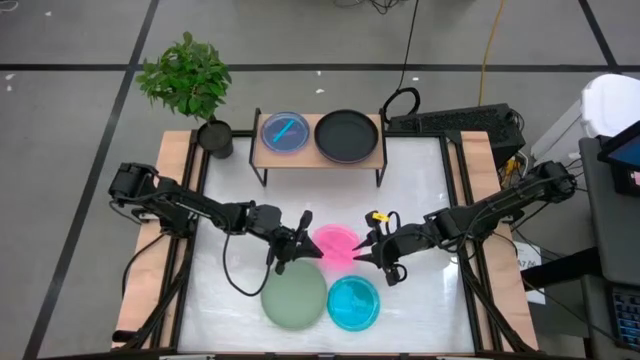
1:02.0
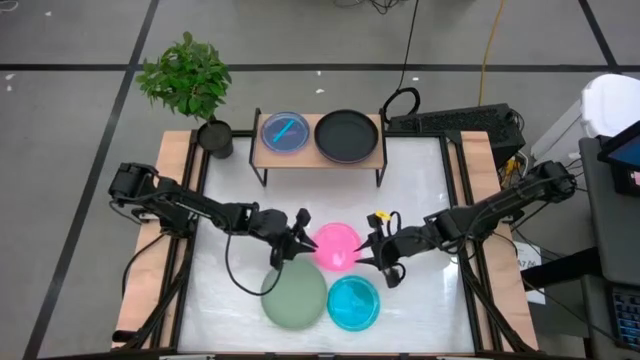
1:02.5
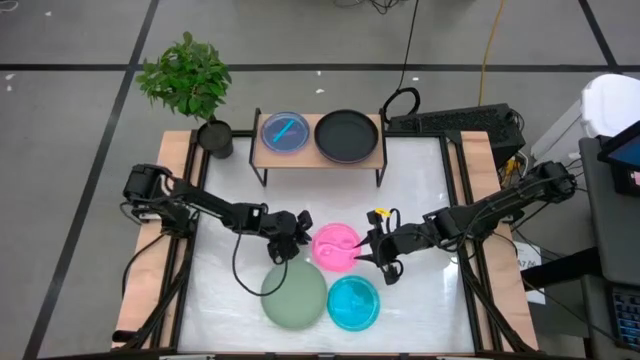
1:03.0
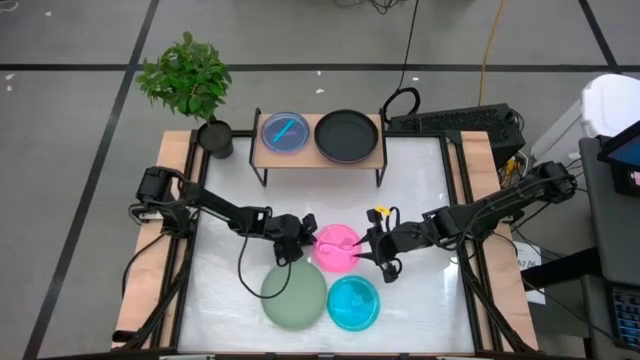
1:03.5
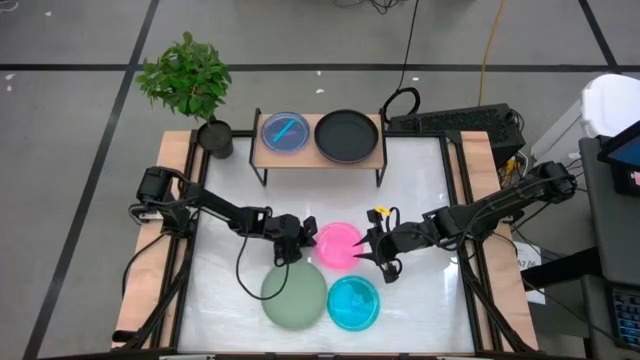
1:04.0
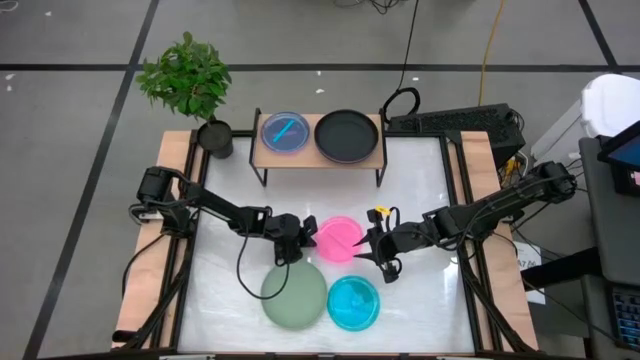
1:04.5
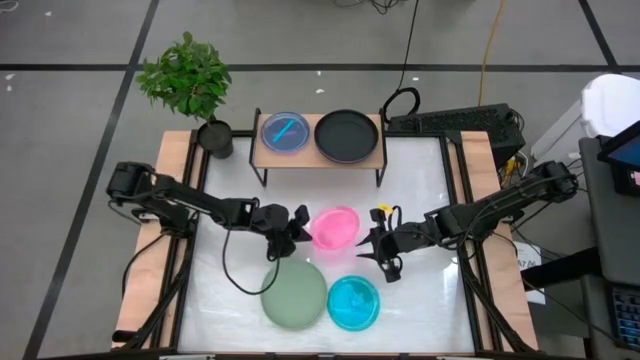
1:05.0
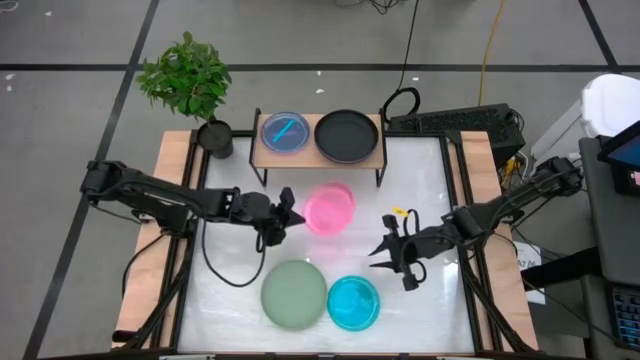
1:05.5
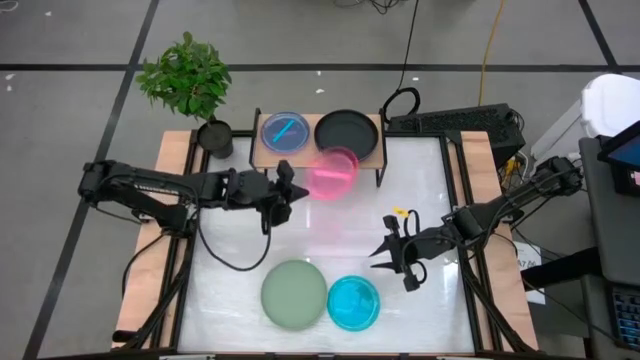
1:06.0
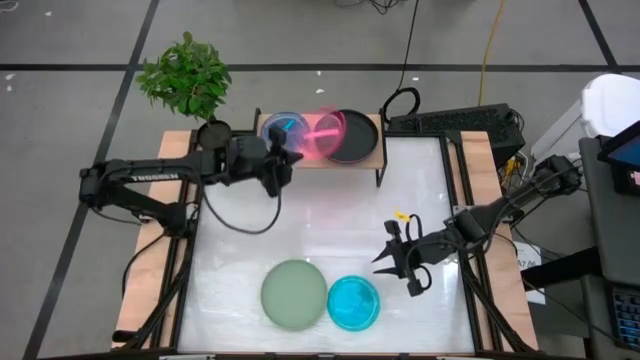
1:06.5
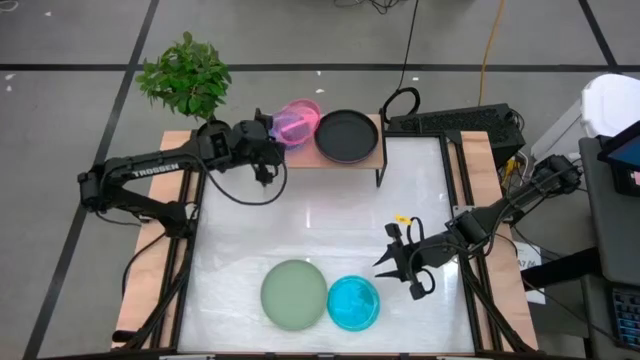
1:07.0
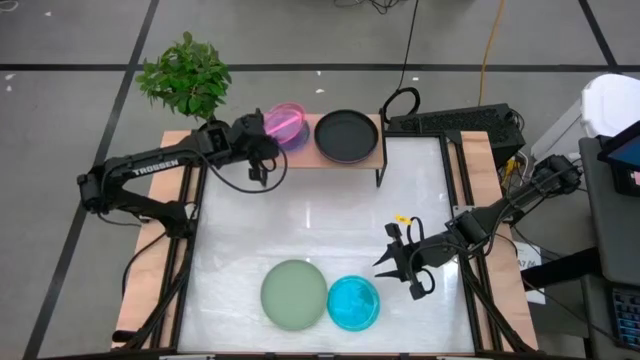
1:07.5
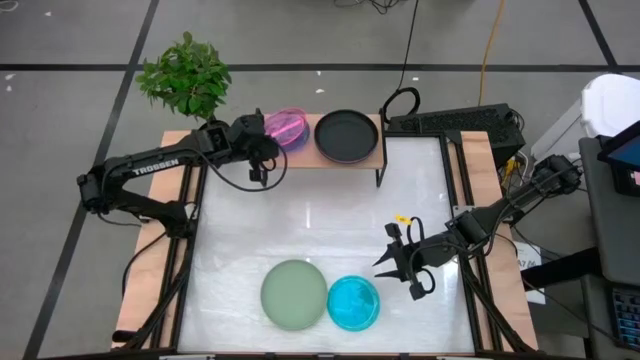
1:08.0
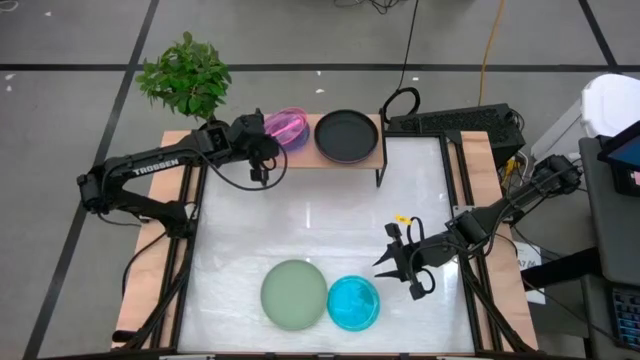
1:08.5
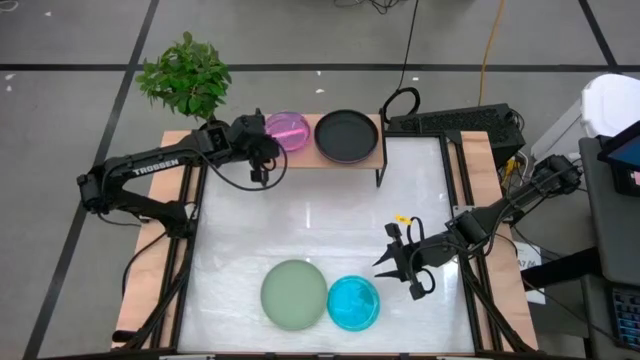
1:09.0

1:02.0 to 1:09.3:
Task: Place and stack plates onto a shelf
Stack the pink plate on top of the blue plate on the shelf

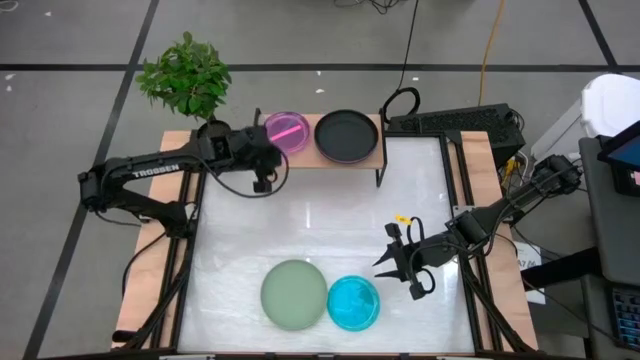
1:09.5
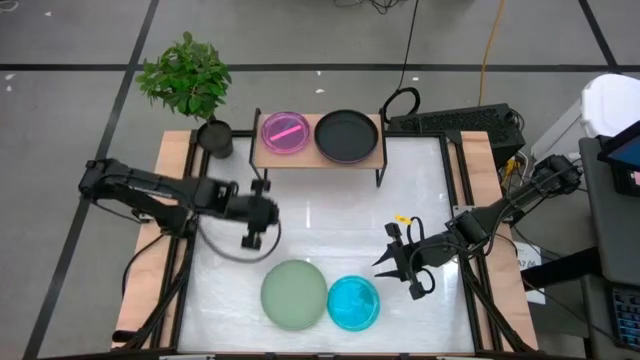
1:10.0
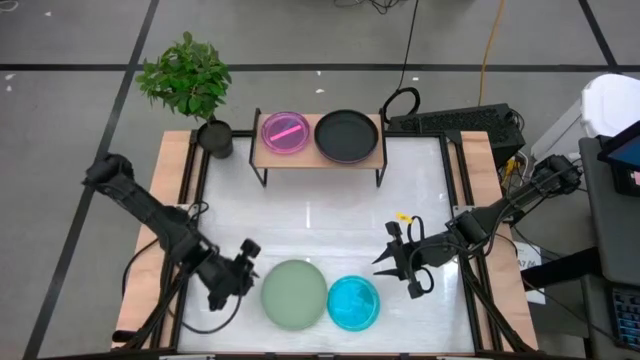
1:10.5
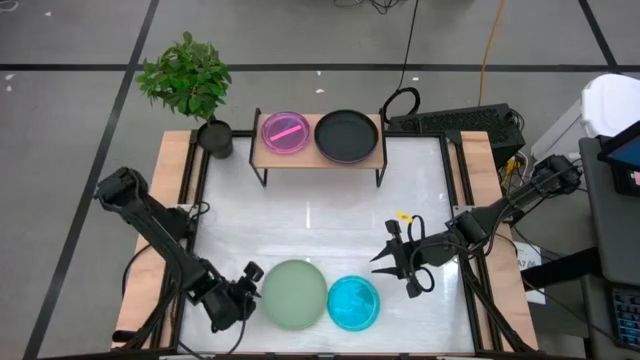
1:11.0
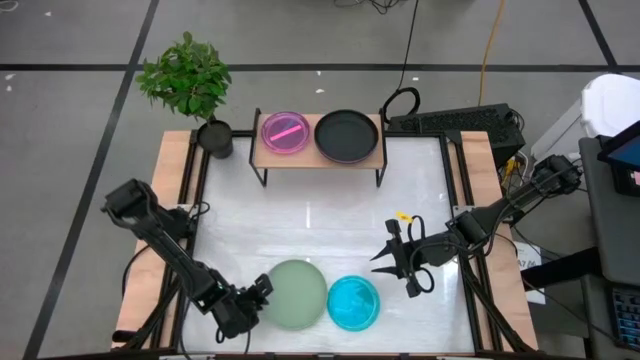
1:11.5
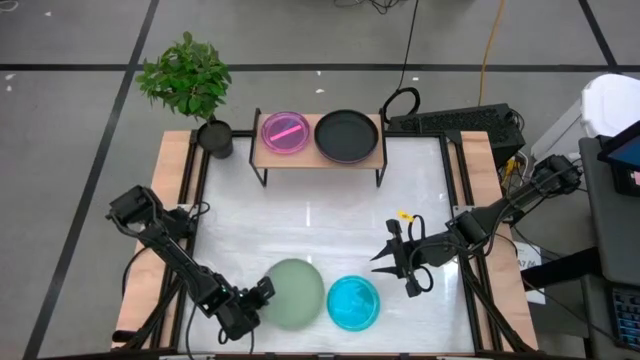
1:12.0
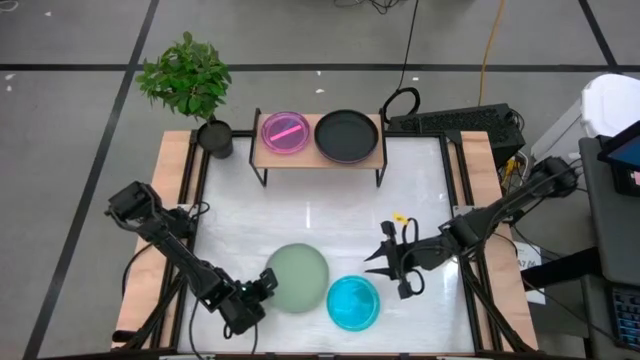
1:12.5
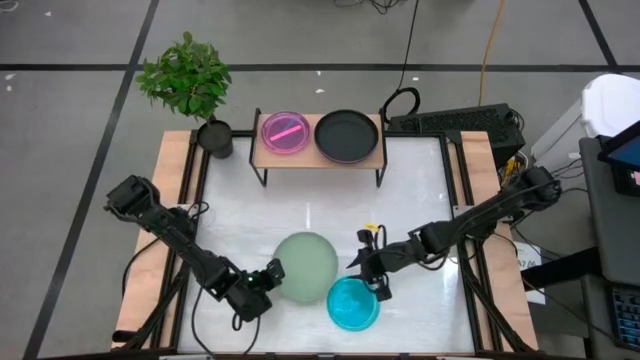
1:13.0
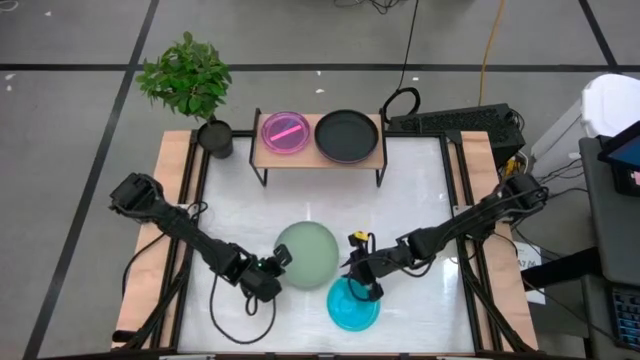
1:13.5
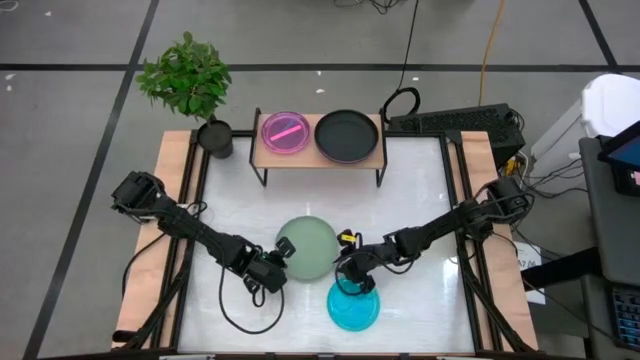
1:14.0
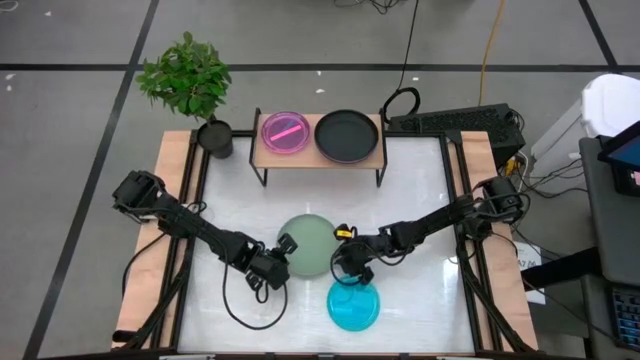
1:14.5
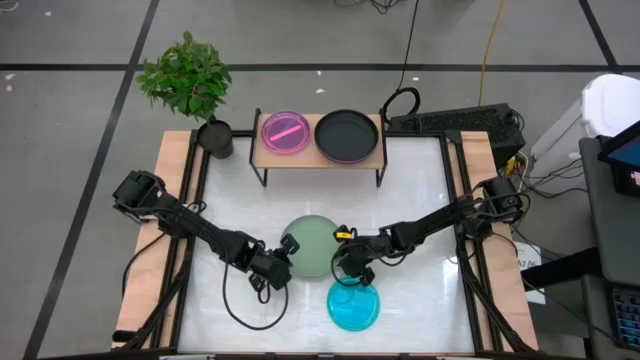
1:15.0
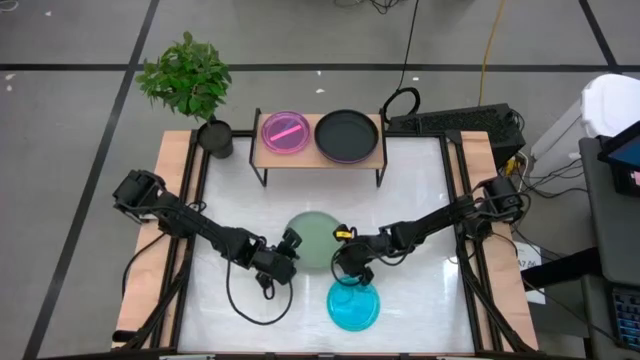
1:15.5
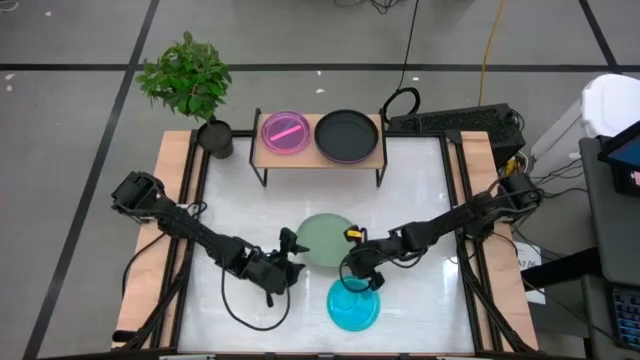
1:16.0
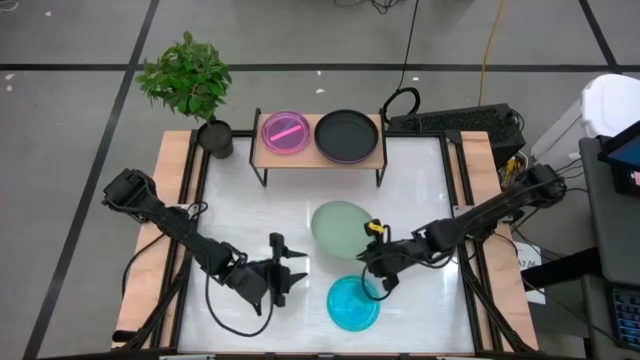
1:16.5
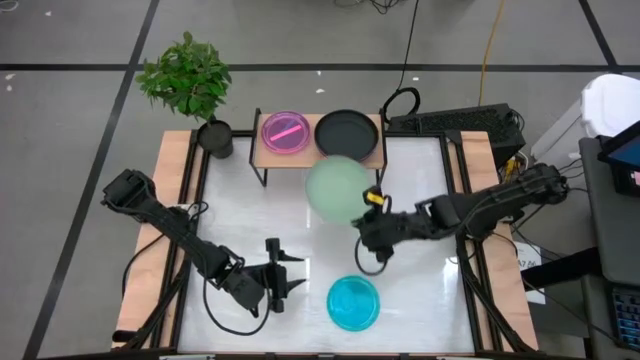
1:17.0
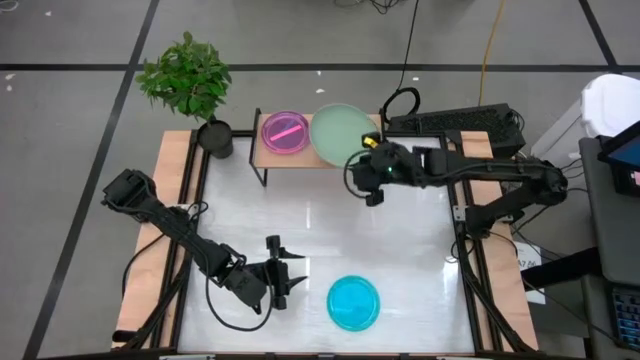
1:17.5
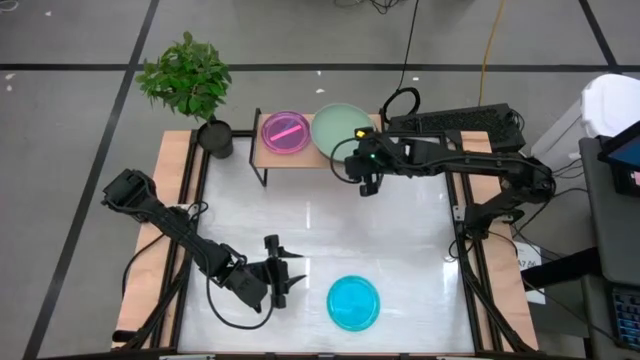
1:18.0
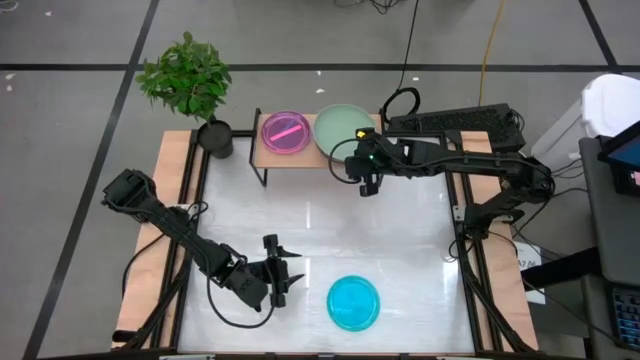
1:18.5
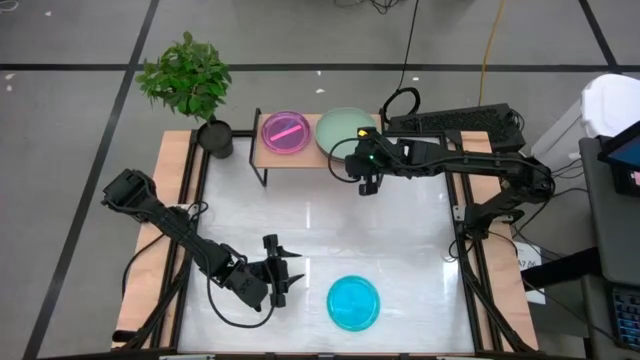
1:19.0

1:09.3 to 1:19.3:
Stack the green plate on top of the black plate on the shelf

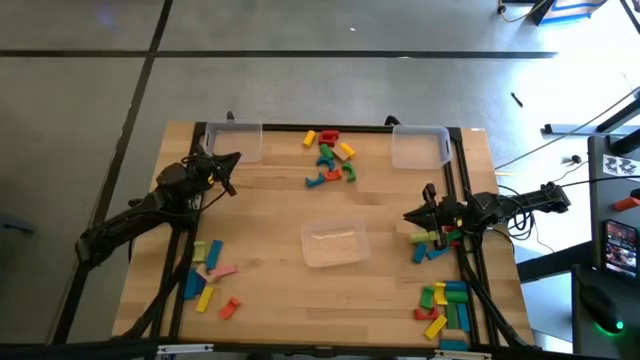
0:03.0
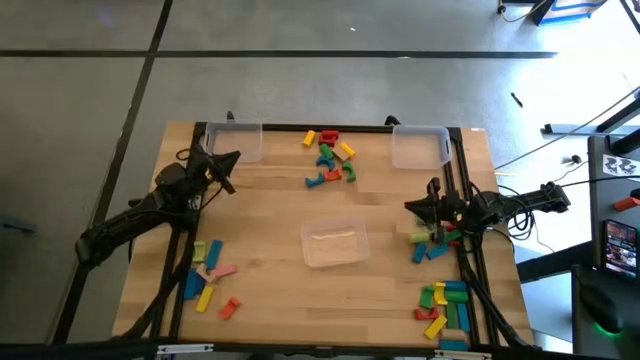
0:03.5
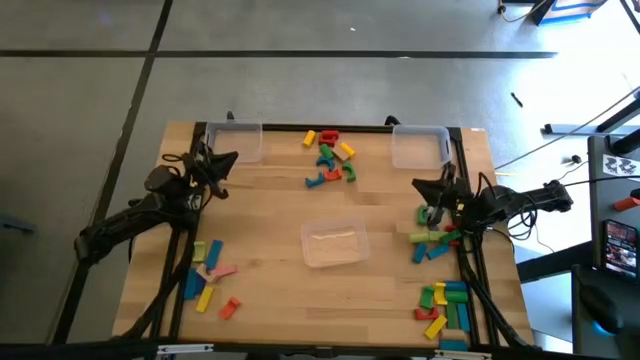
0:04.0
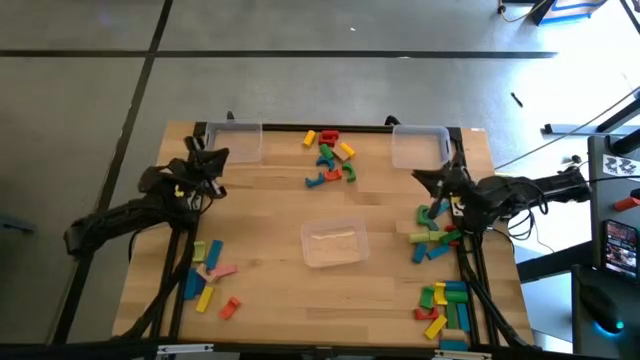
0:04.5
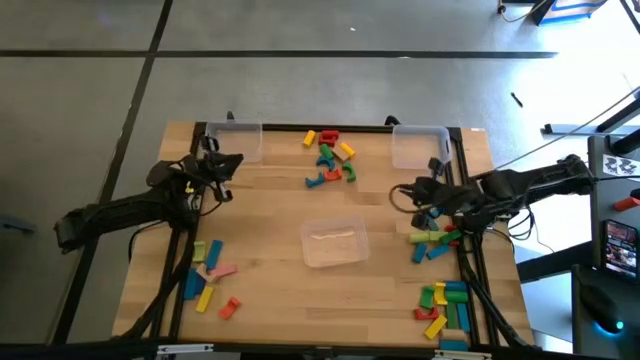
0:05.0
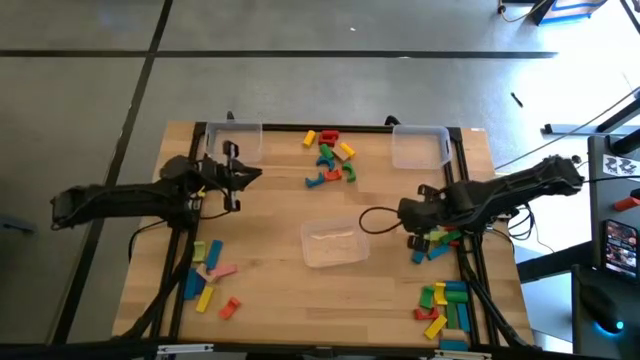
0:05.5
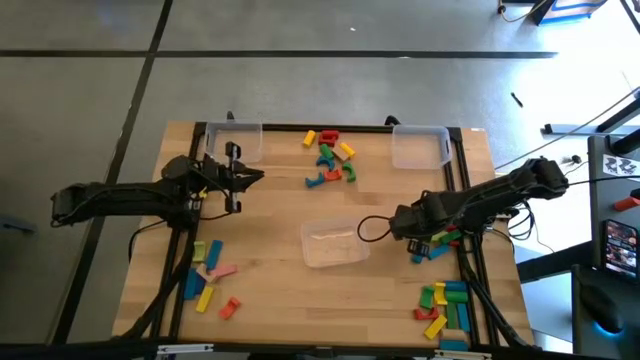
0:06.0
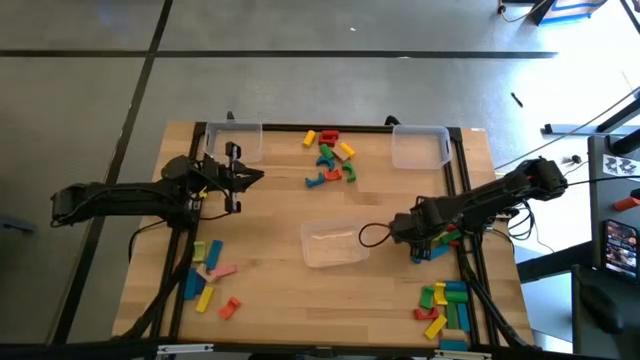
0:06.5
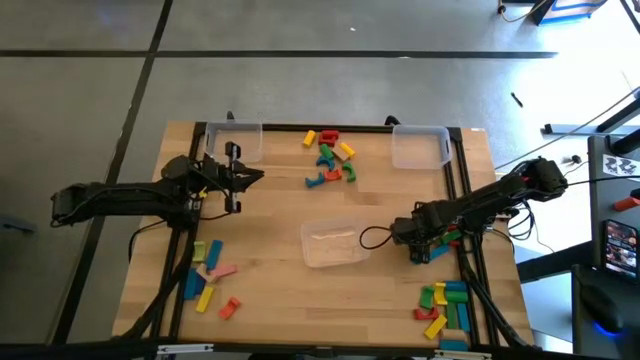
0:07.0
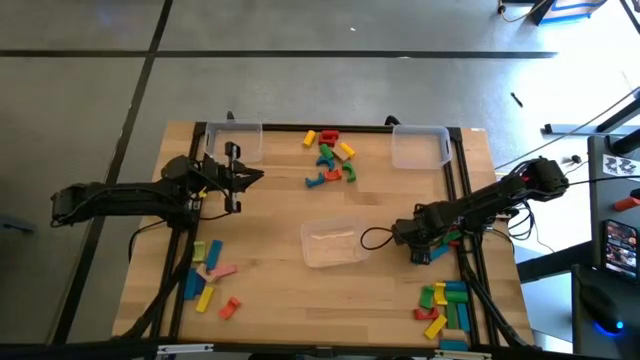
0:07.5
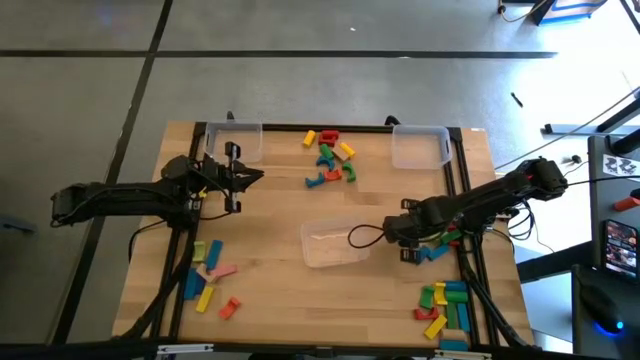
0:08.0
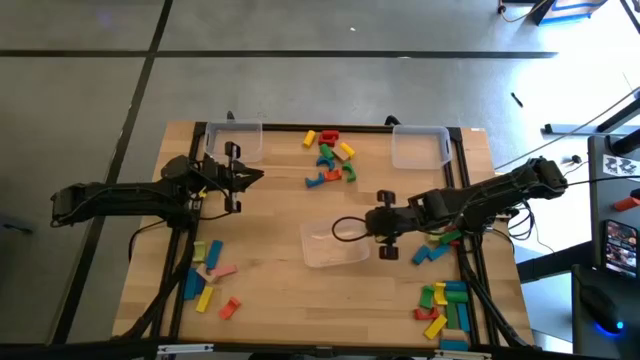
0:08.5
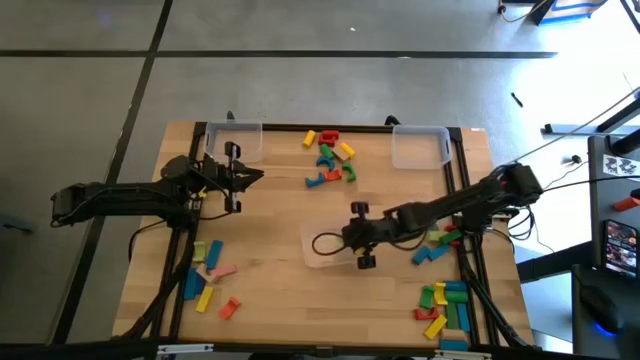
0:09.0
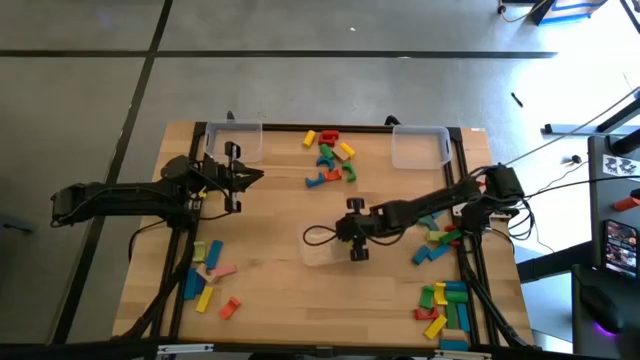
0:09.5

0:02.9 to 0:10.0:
Task: Sort blocks by size
Put the light green cylindrical block into the bottom transparent bin
